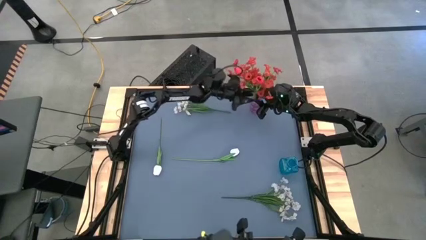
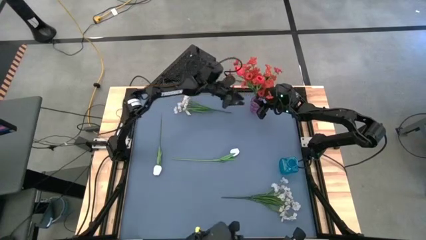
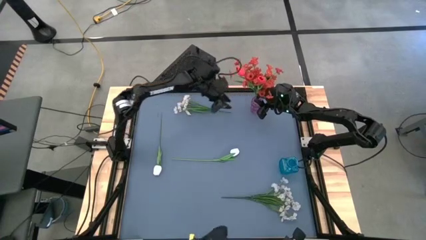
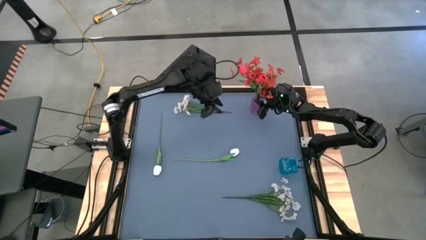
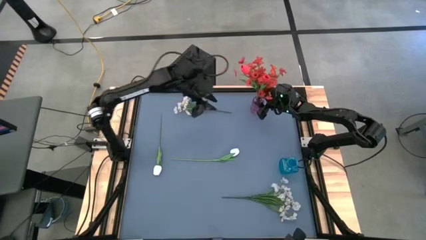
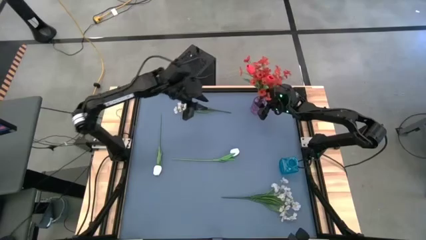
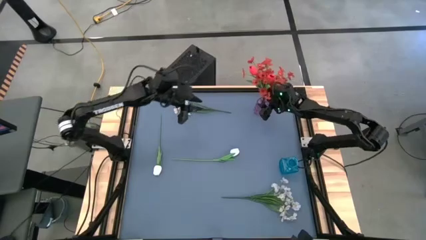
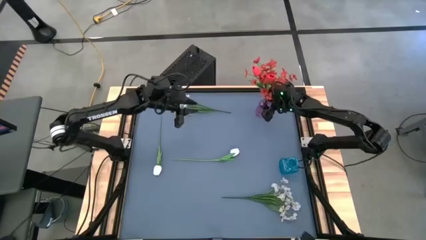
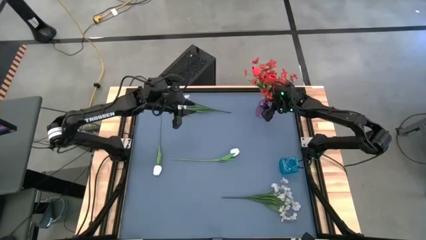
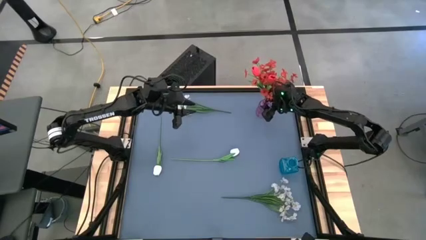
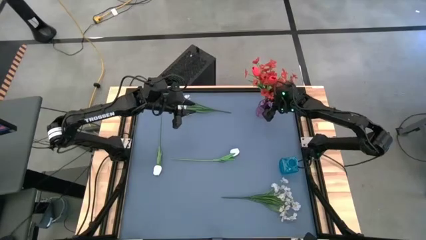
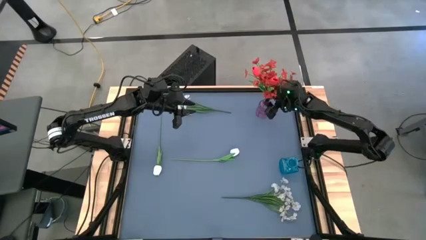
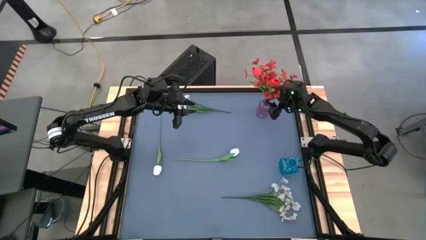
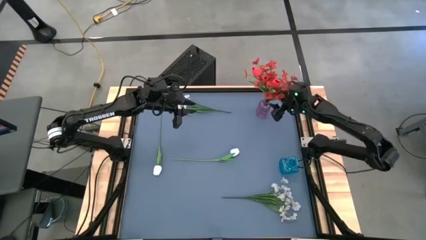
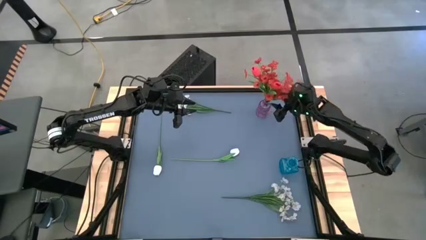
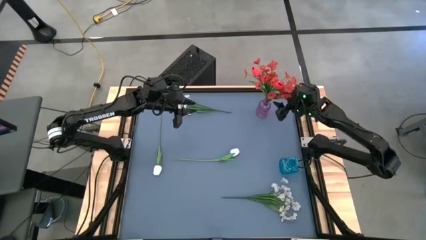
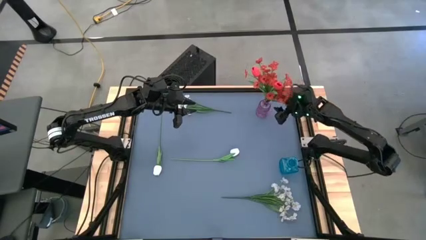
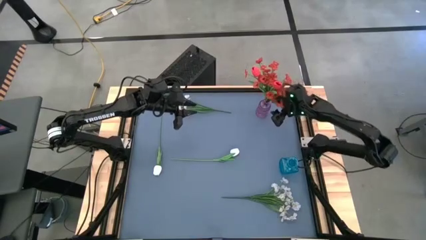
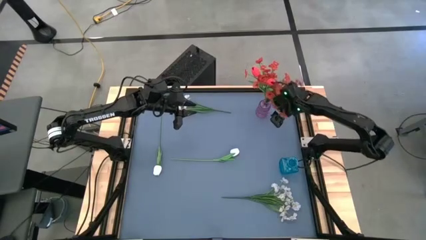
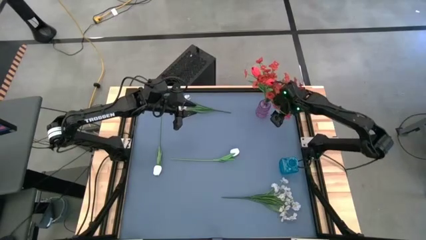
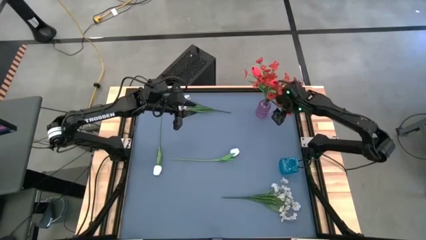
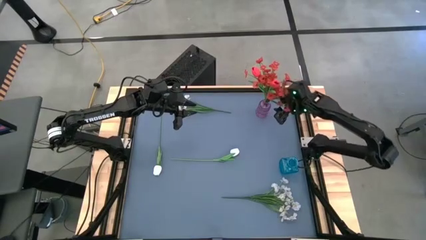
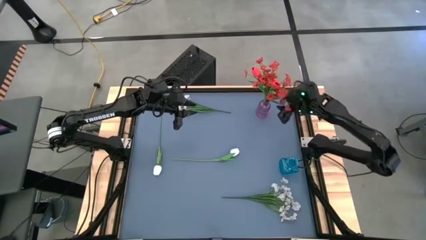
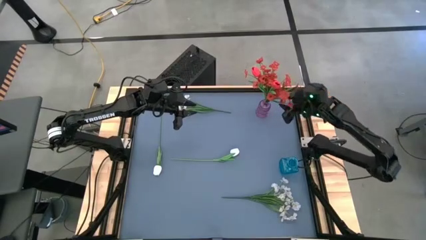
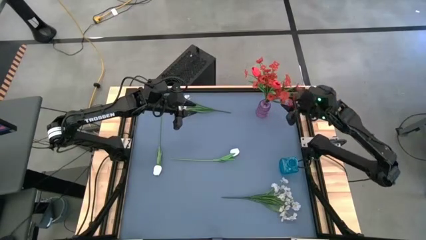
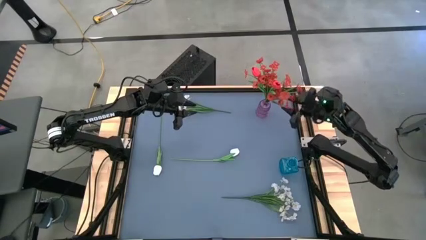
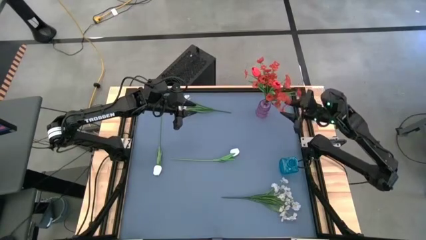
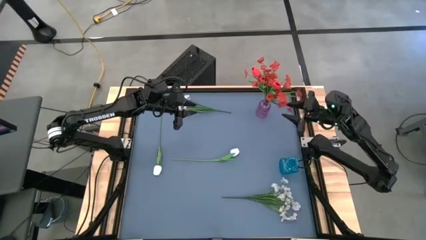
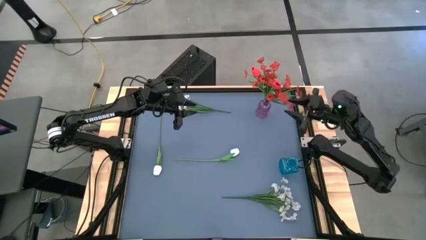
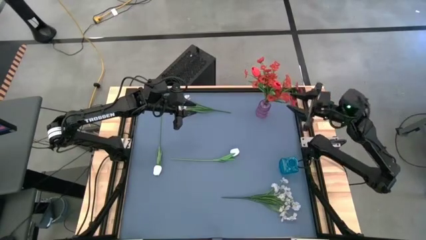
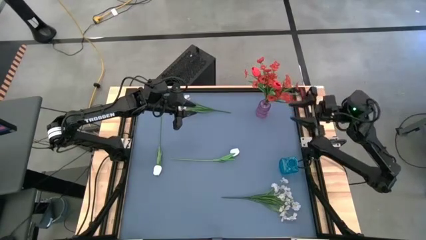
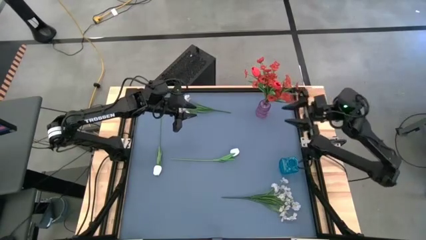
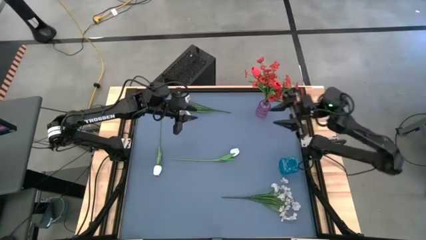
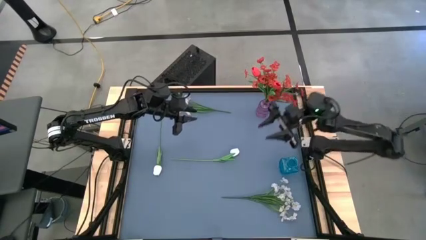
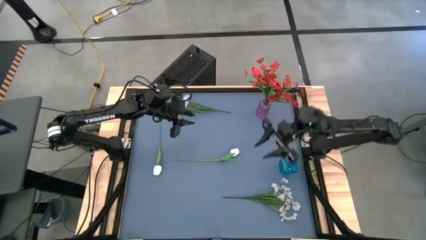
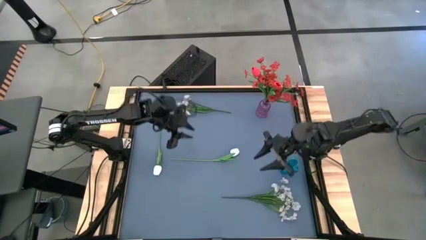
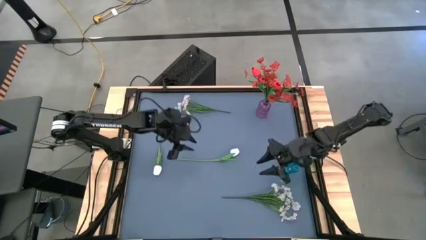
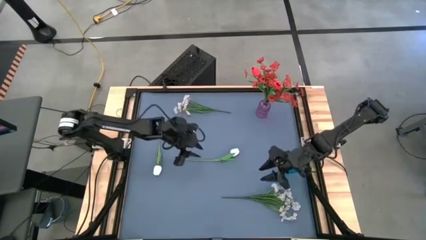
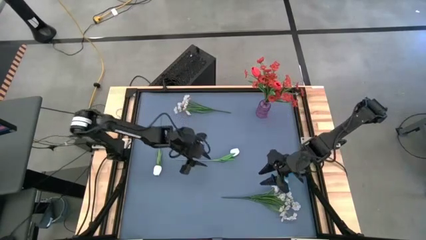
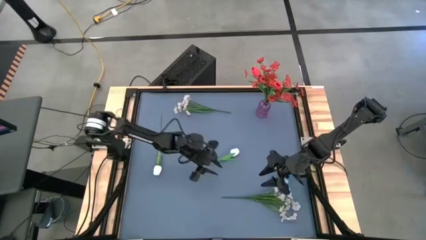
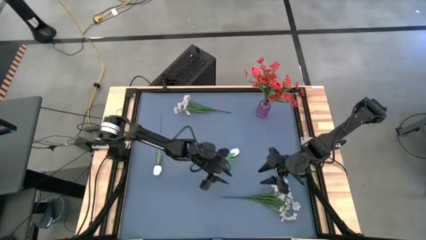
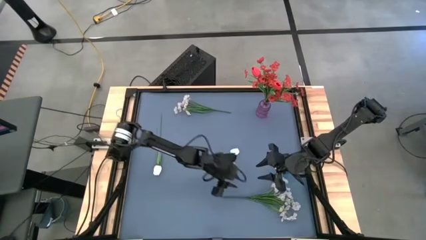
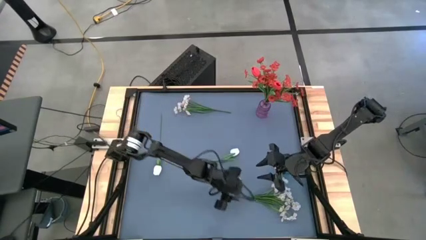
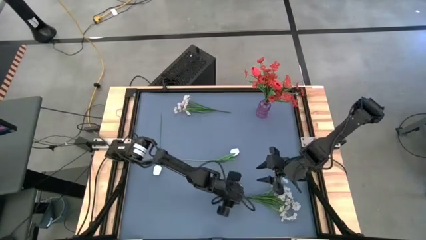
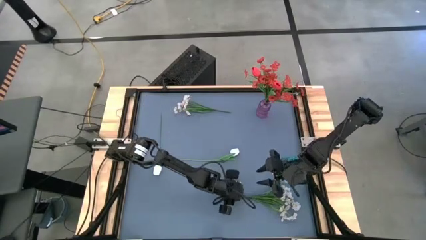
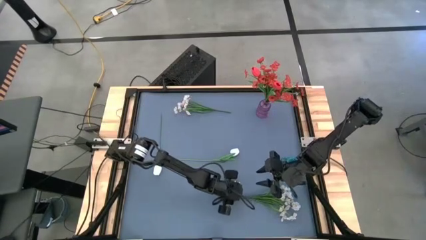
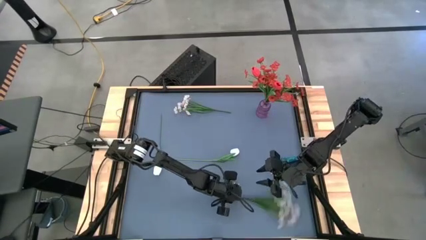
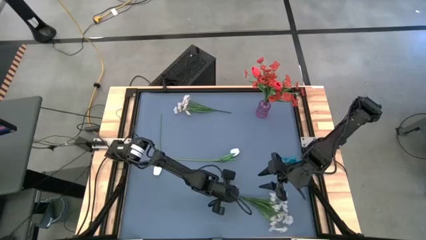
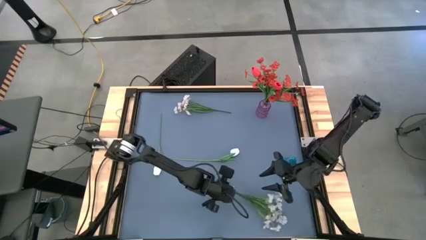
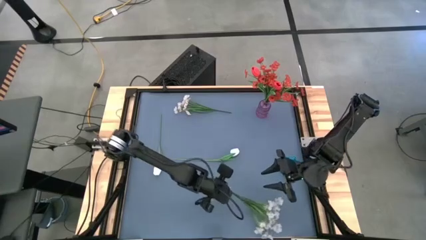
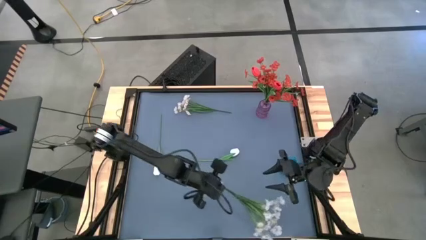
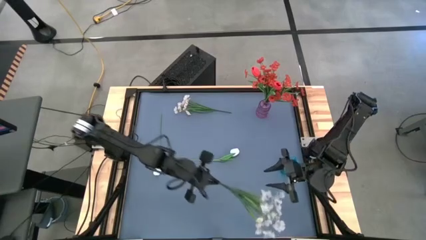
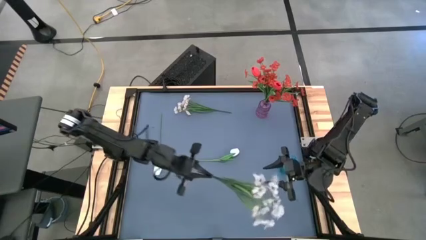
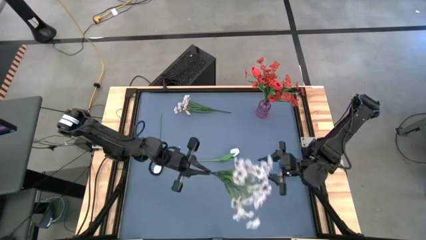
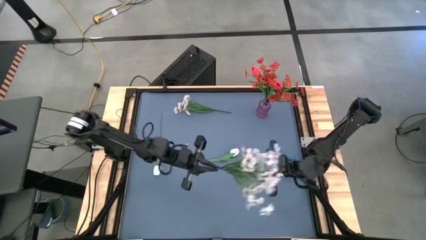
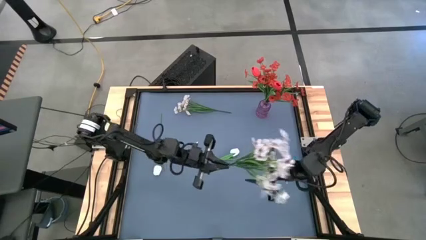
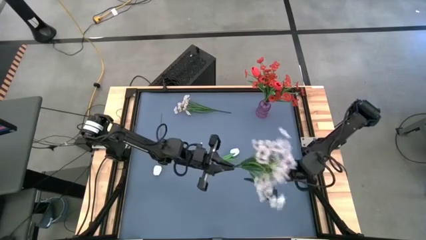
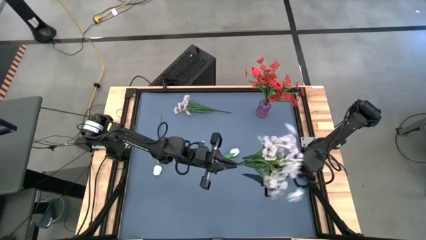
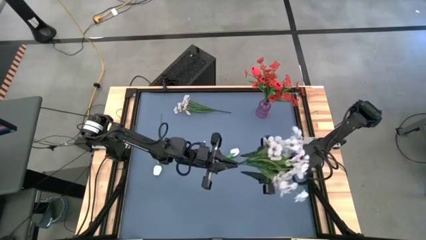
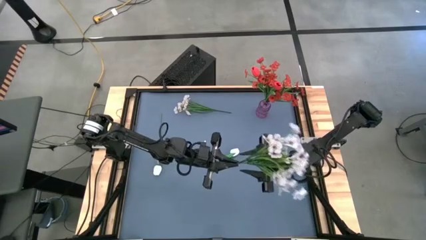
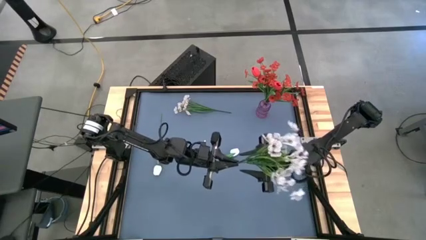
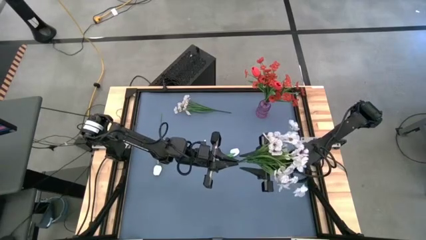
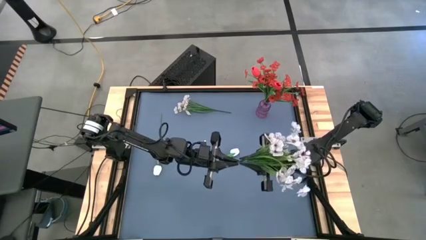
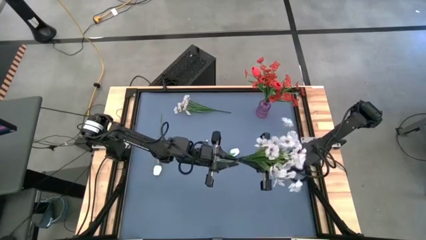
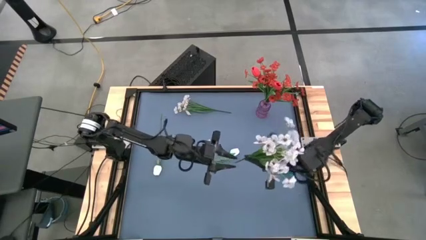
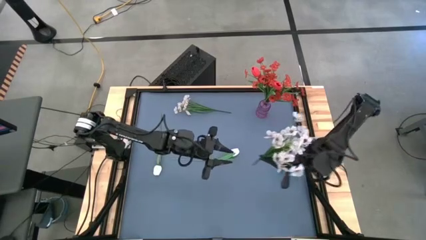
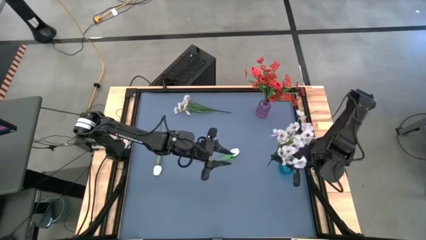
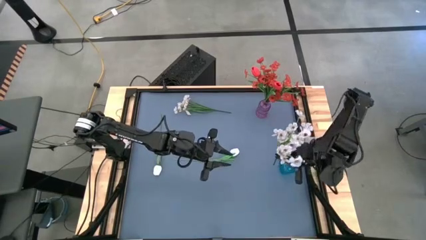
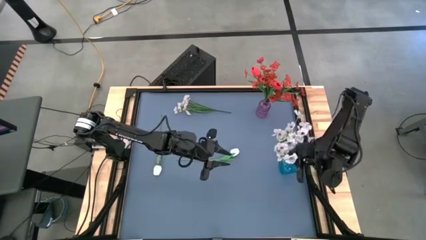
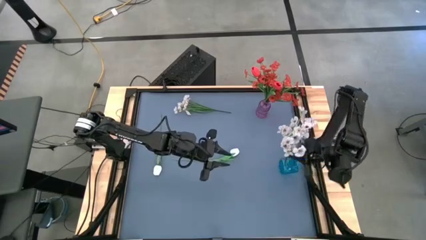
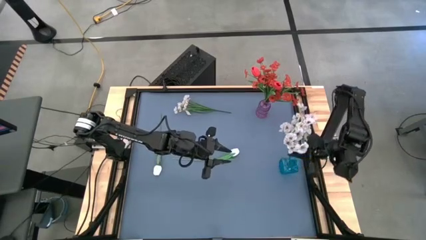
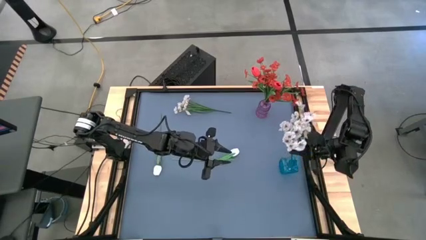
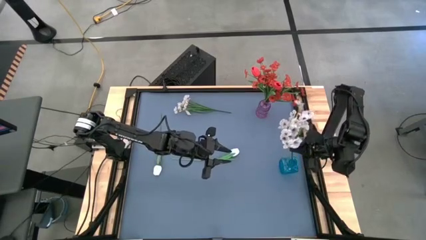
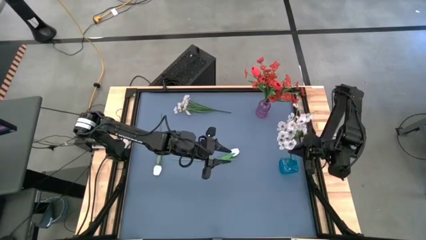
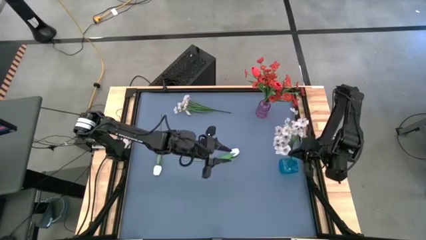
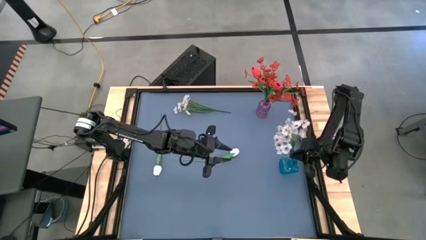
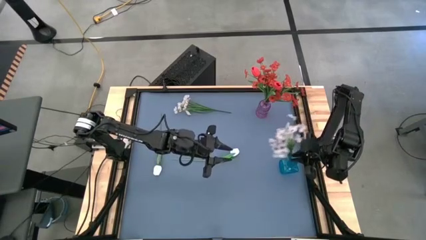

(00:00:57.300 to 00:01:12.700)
Task: Sort flowers into vase by color
Put the bottom white flowers into the blue vase
